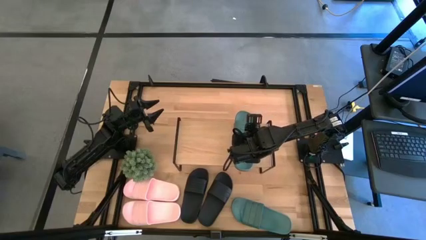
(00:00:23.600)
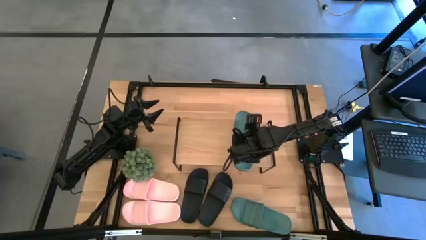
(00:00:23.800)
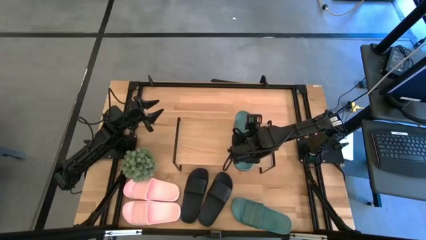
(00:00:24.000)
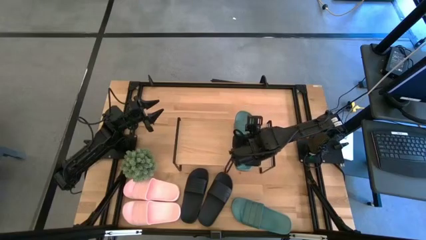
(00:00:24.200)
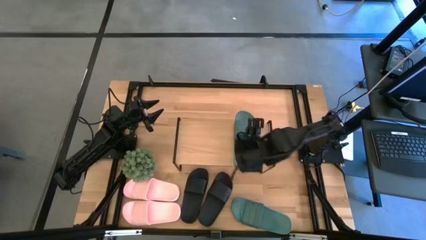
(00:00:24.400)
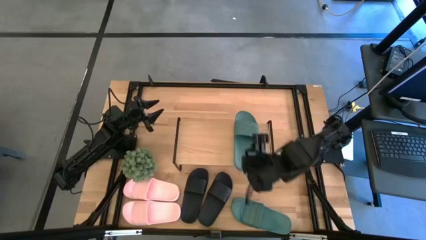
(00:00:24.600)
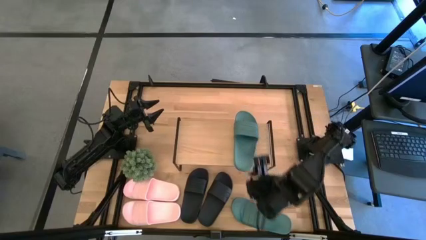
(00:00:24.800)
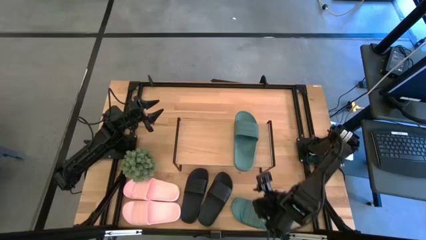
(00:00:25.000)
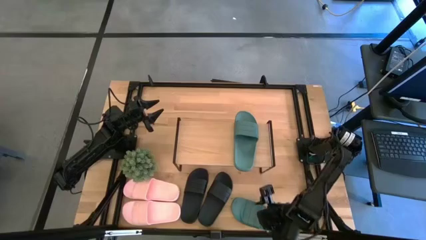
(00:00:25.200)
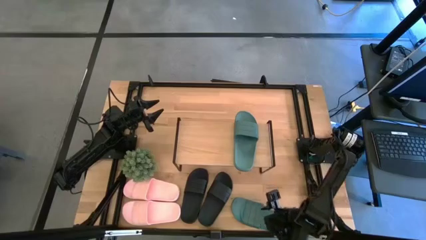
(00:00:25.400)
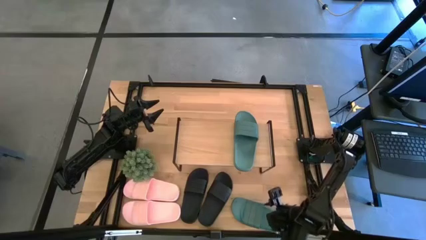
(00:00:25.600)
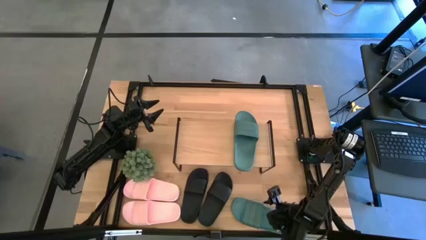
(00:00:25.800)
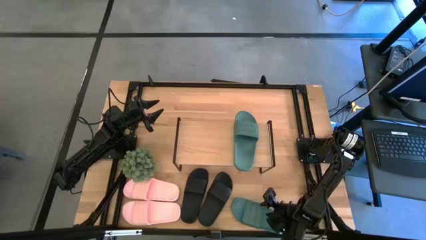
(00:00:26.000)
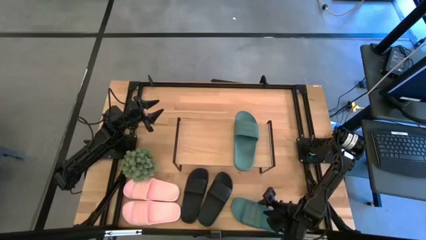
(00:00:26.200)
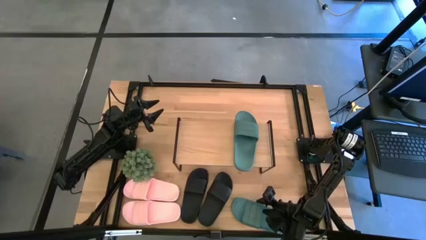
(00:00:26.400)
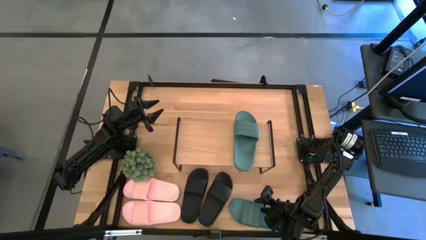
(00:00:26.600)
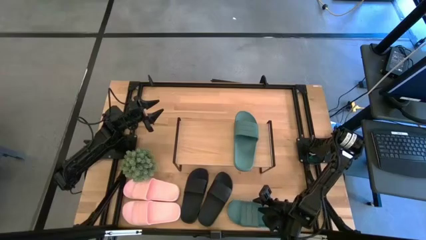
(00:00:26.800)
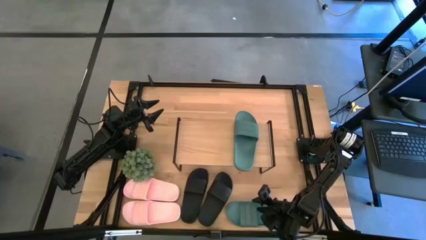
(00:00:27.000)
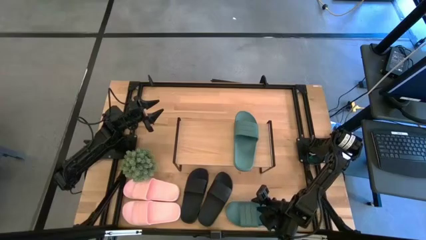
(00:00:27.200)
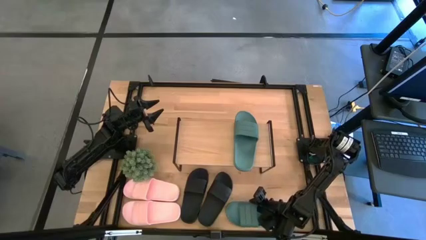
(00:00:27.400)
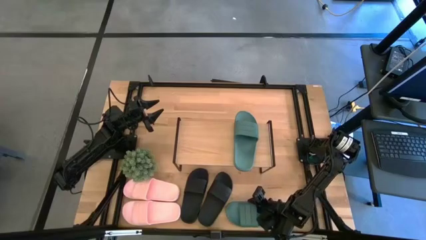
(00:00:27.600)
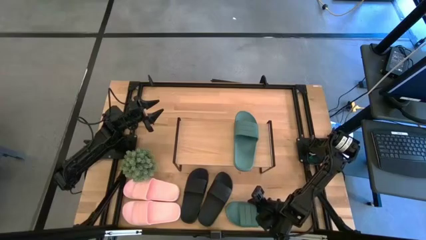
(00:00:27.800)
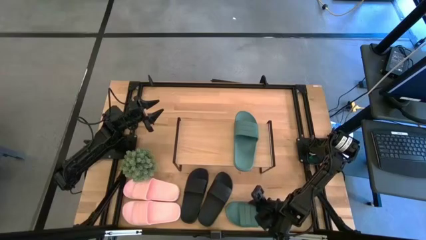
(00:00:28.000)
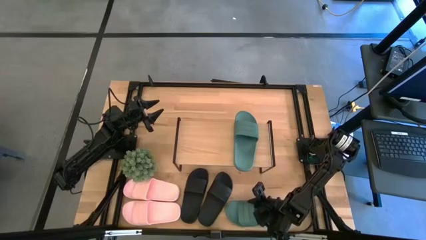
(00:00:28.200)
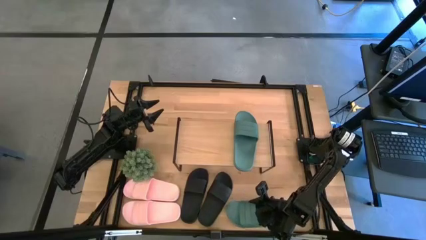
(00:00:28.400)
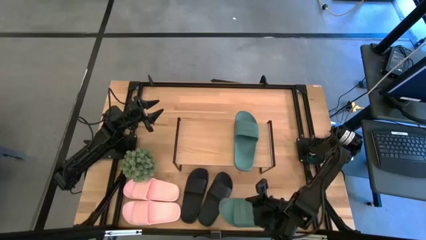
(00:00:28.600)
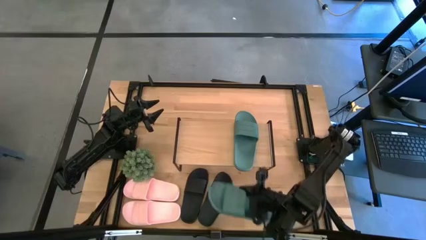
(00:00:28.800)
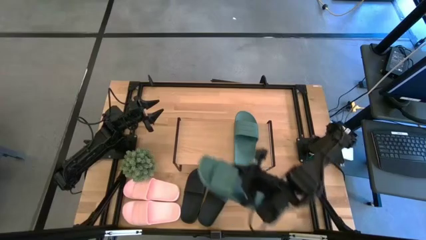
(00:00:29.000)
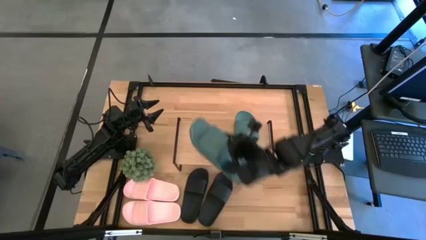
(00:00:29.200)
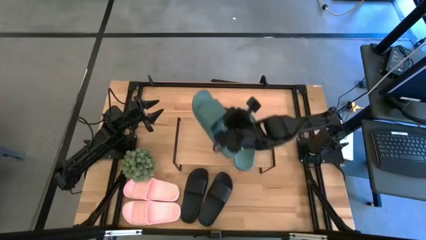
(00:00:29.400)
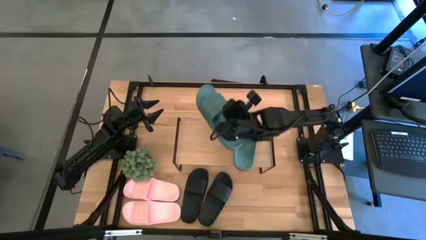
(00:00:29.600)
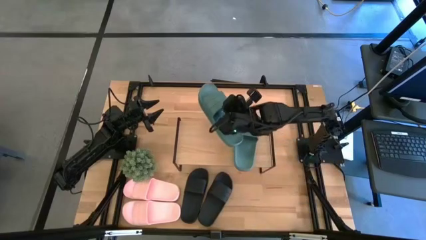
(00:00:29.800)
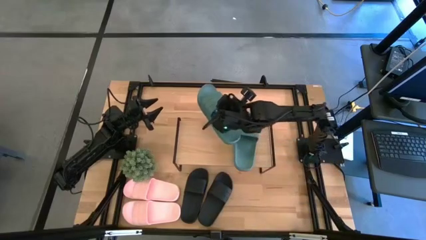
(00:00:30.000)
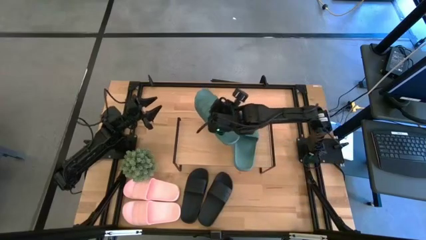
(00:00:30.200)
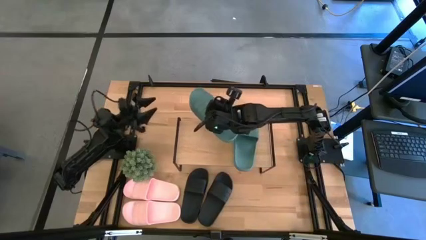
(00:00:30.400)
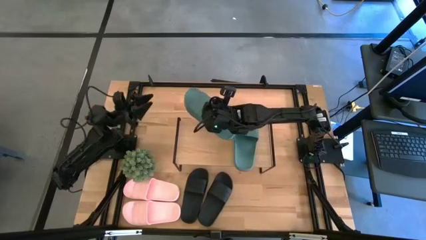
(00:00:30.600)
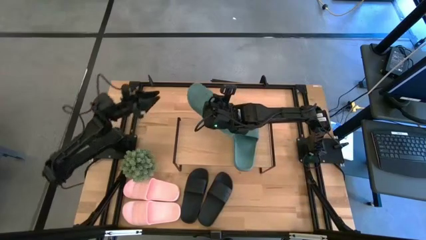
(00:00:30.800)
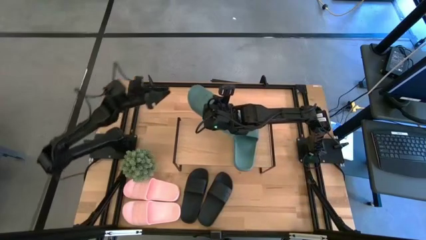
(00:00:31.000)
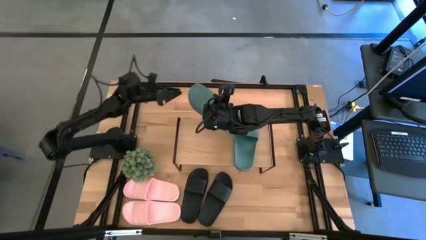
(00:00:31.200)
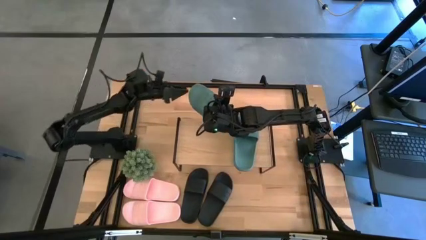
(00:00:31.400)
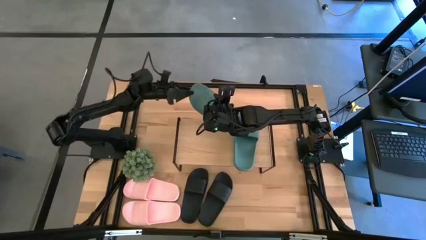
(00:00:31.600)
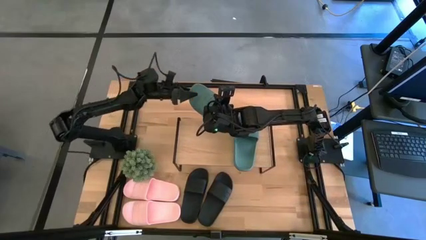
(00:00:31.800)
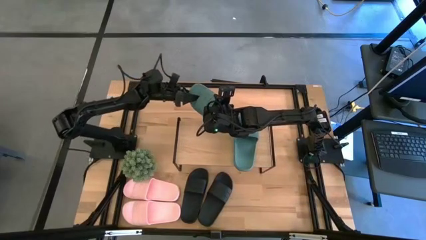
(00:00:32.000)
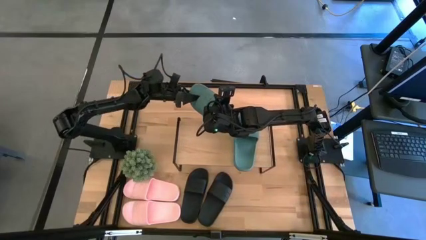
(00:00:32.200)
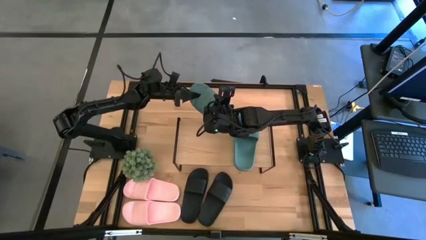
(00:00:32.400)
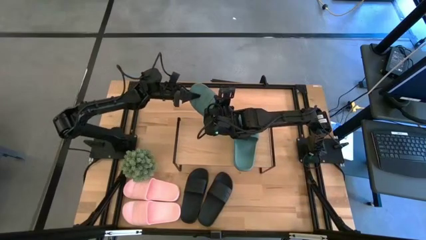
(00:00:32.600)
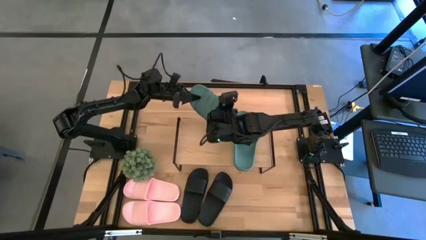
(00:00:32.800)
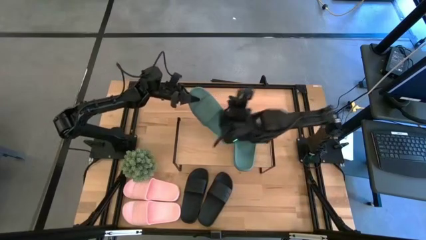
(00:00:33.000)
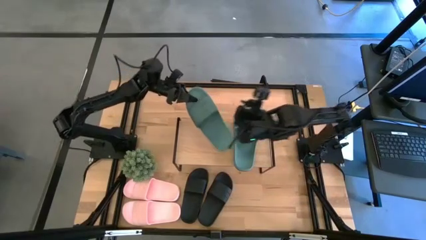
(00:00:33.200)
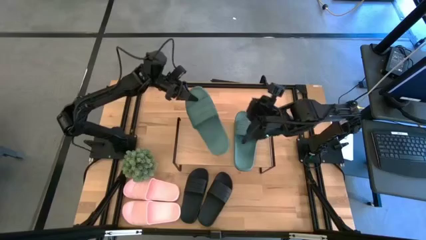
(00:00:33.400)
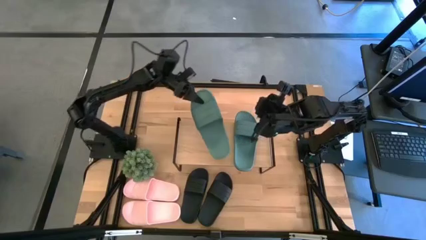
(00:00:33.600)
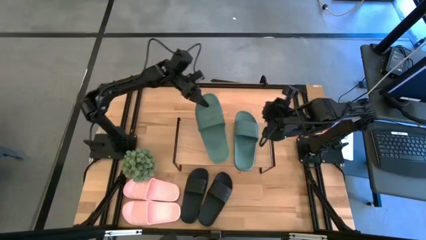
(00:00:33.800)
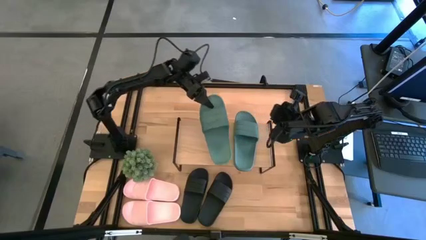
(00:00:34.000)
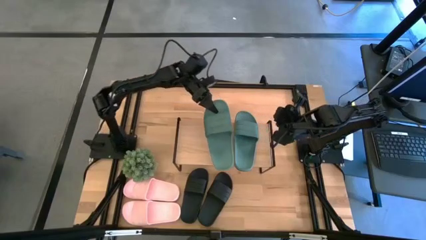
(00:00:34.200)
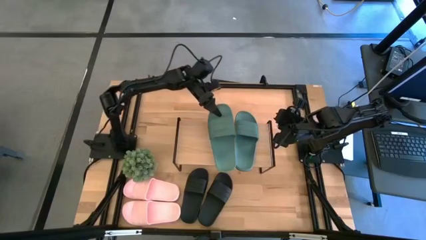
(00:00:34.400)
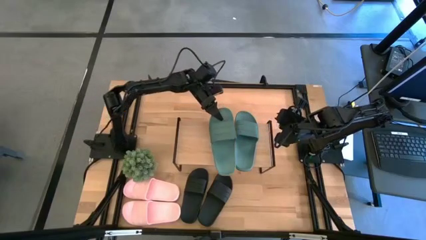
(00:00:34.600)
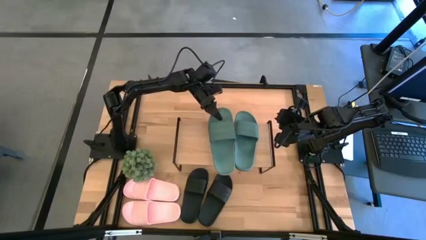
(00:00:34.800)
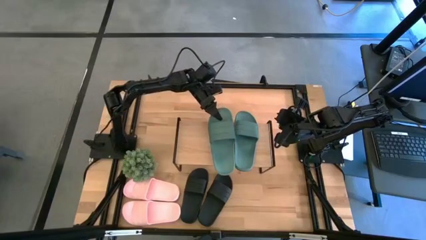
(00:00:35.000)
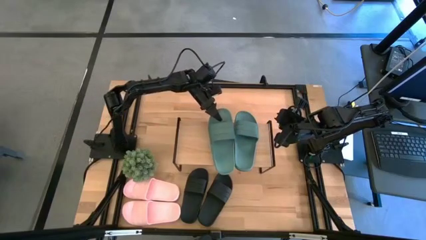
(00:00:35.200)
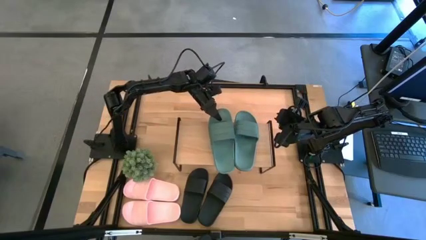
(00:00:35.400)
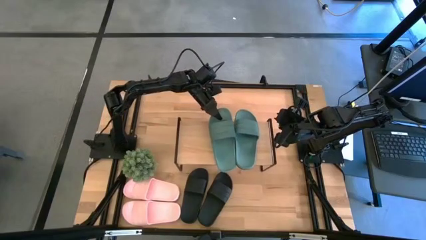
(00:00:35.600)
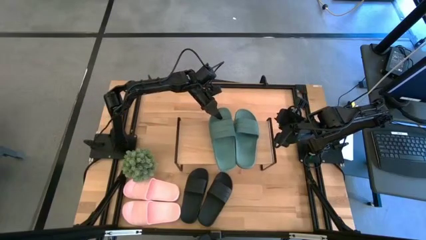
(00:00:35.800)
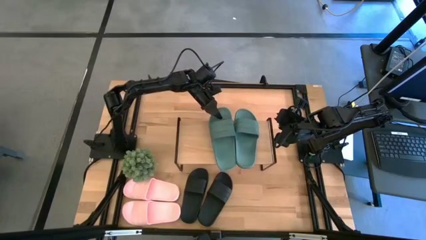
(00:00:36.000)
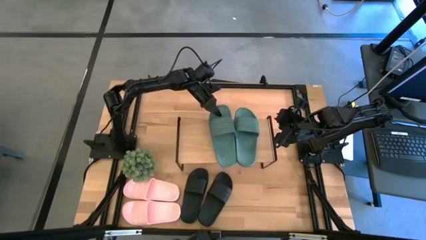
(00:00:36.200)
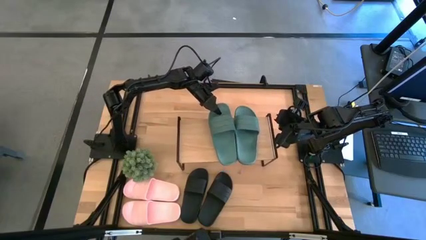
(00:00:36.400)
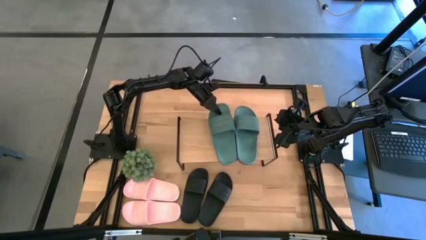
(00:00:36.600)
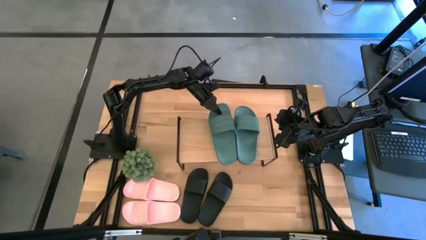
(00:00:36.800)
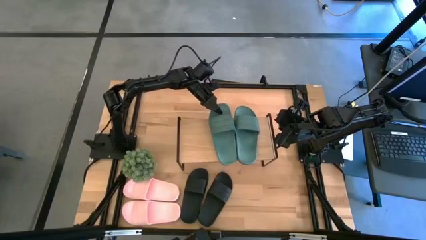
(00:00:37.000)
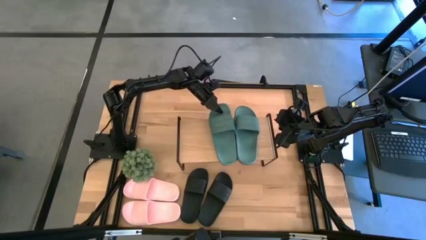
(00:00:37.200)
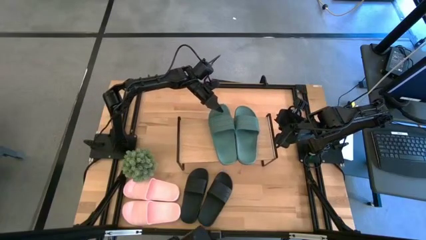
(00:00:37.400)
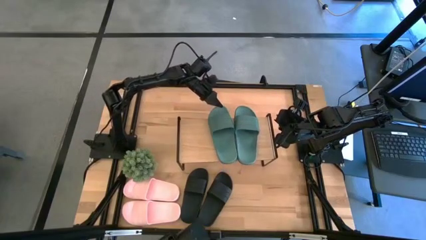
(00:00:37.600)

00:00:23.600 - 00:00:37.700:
Task: Pick and place slides into the shelf
Put green slipper on the shelf

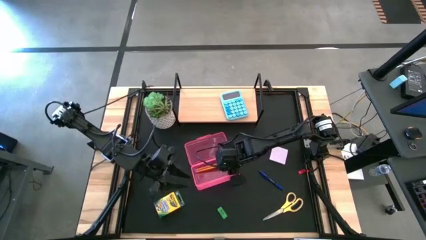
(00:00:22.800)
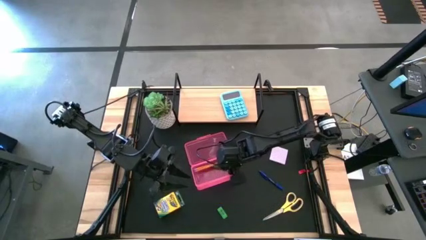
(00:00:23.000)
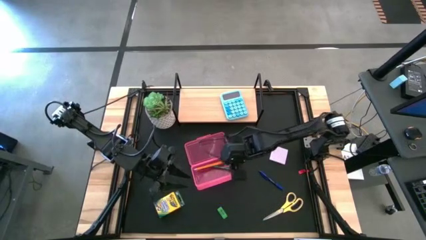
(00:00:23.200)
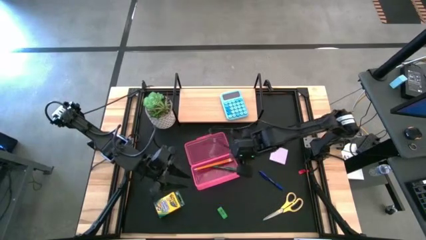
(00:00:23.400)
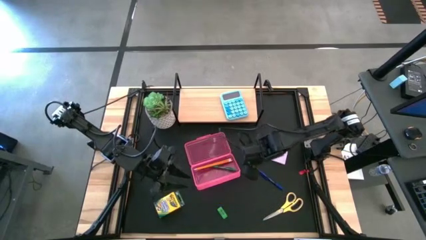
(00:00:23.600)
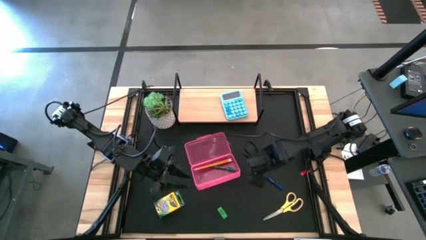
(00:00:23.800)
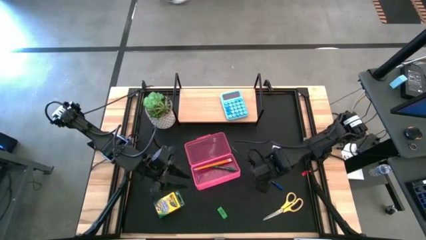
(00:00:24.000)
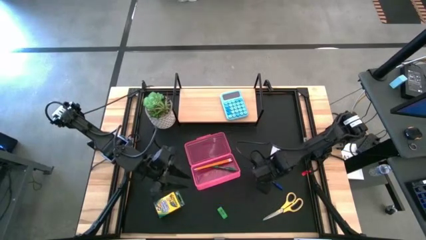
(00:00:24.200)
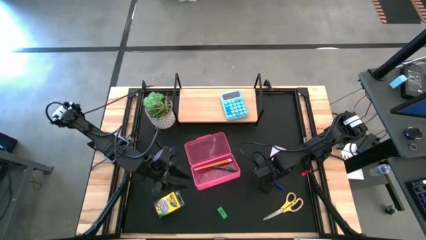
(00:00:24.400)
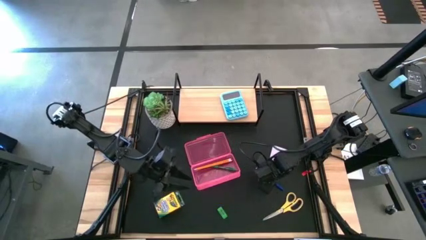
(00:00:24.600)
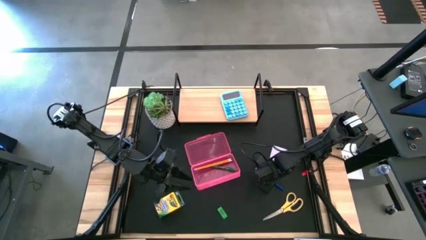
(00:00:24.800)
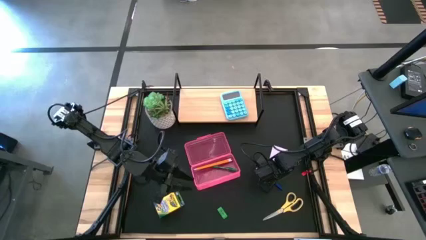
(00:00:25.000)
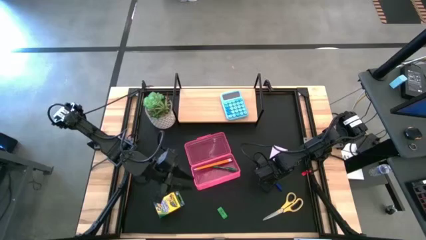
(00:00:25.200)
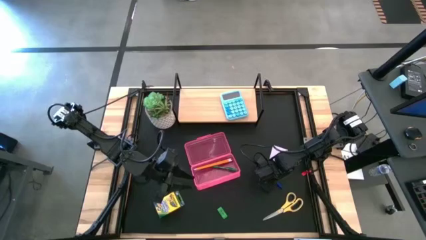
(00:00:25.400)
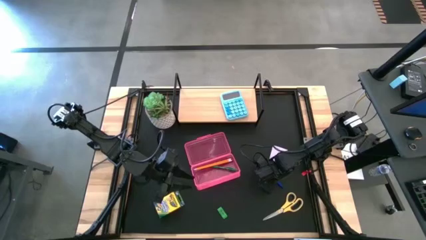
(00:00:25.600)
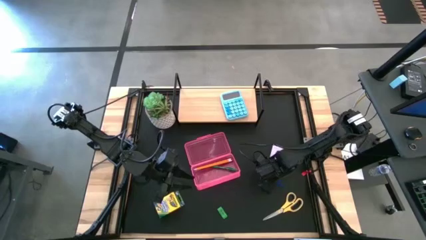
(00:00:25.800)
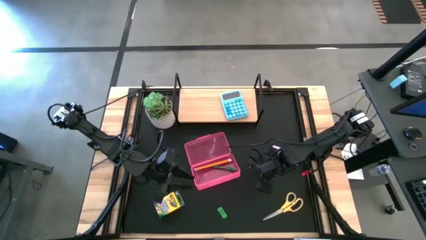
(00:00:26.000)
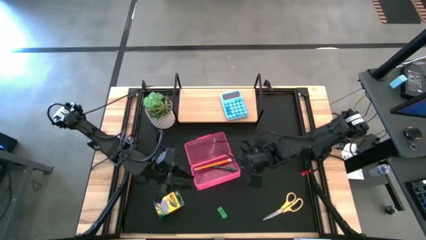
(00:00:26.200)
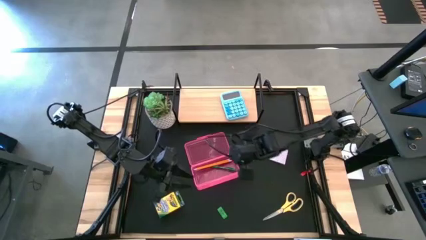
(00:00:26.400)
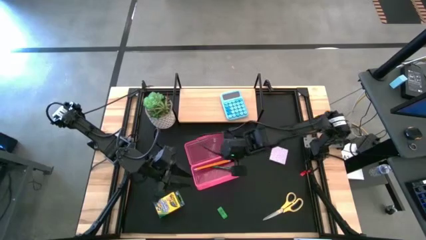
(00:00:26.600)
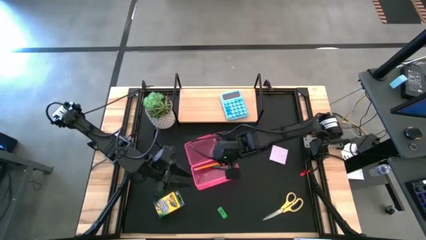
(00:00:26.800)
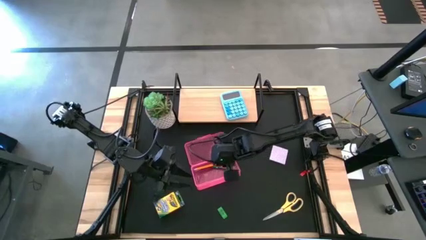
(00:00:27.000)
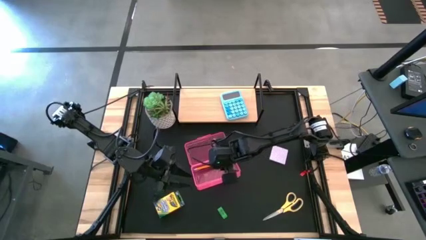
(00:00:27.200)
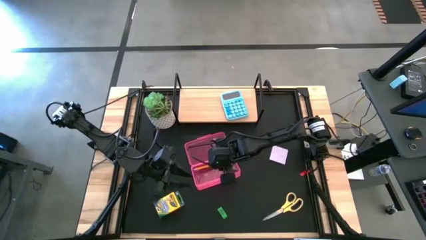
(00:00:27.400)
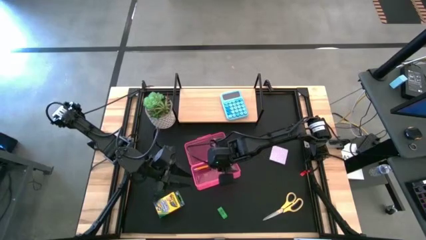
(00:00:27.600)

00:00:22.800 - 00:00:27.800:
Task: Pack school essentials
Put the blue pen into the red supply box
